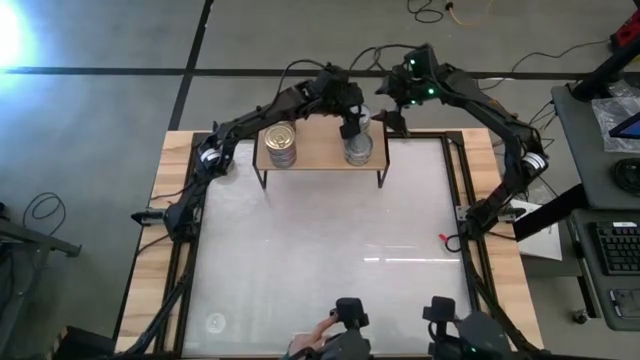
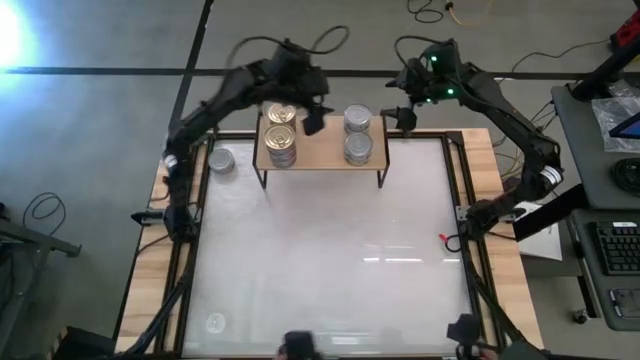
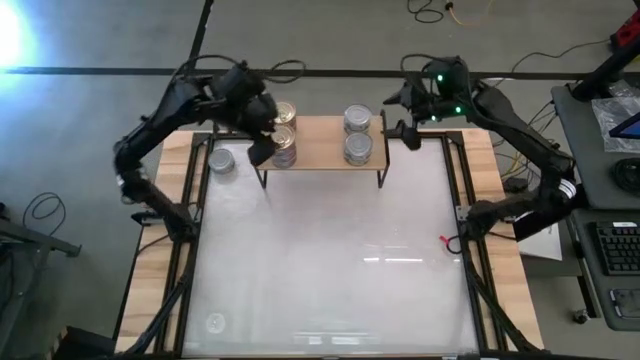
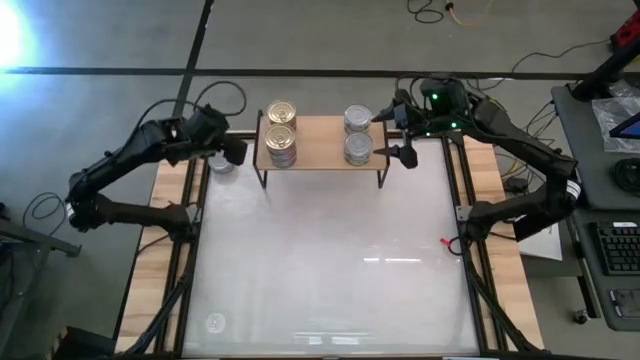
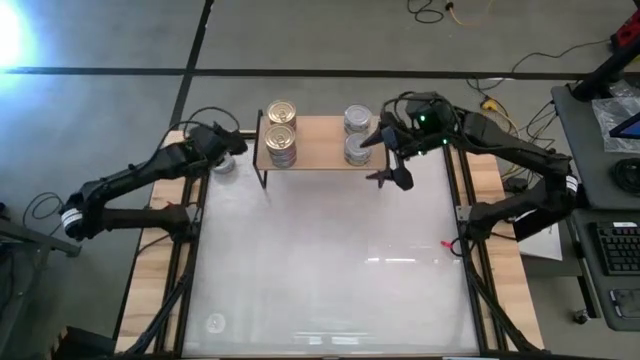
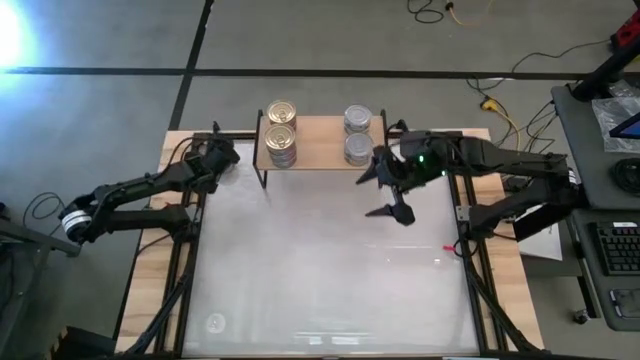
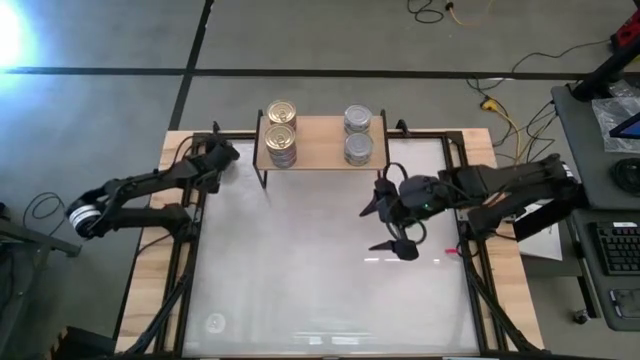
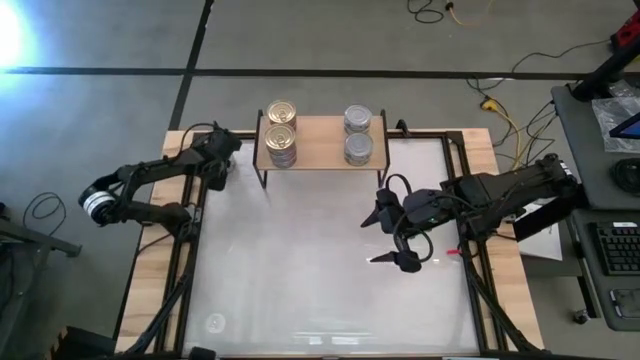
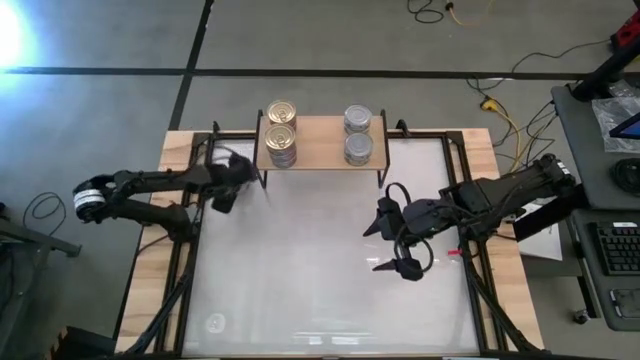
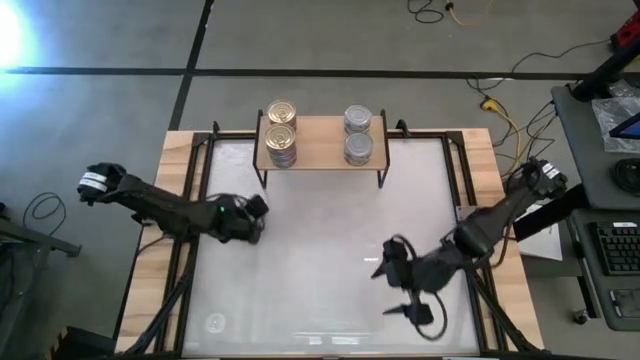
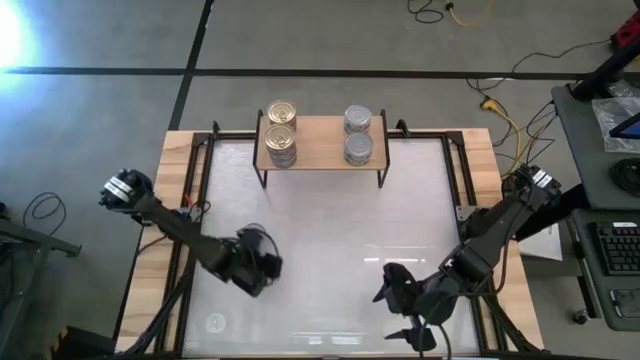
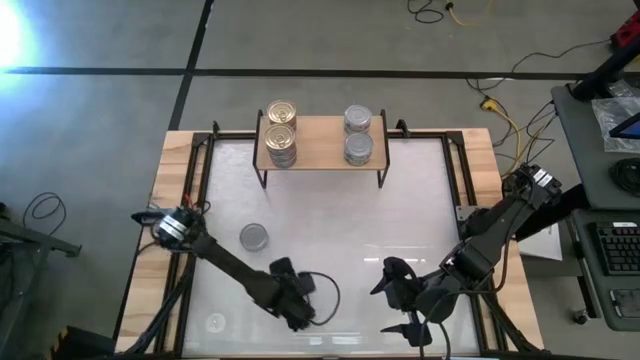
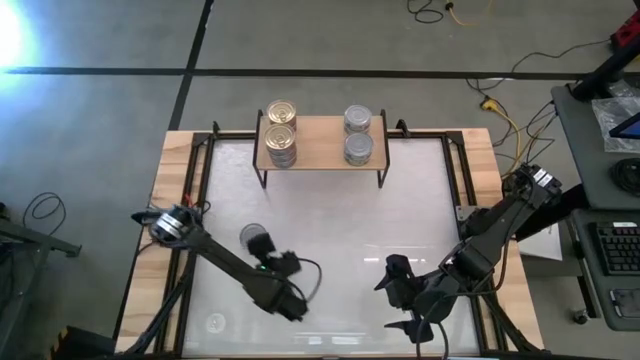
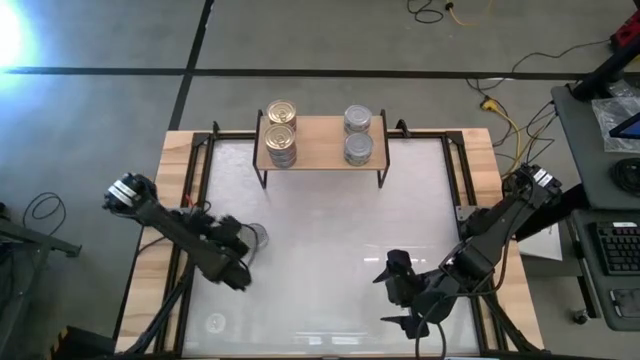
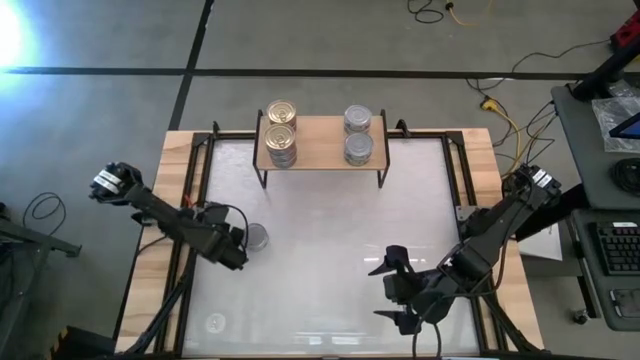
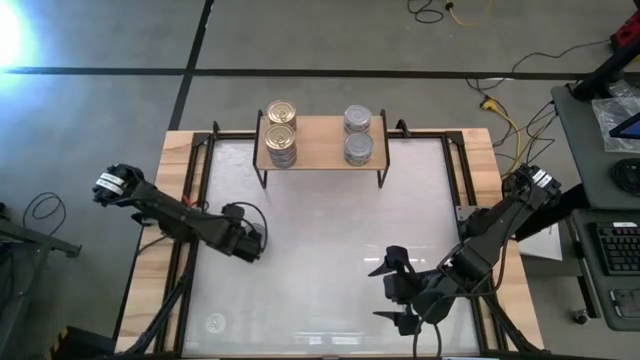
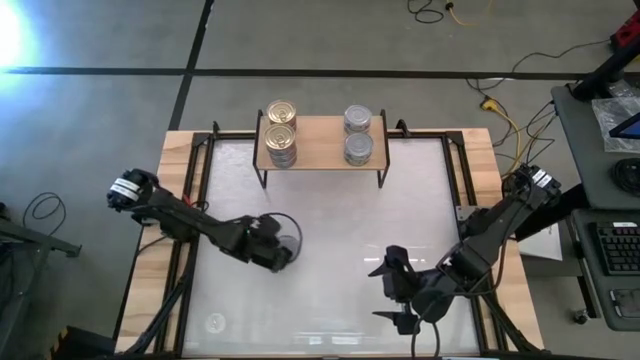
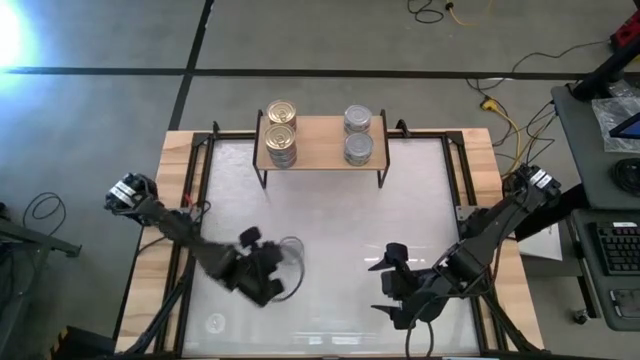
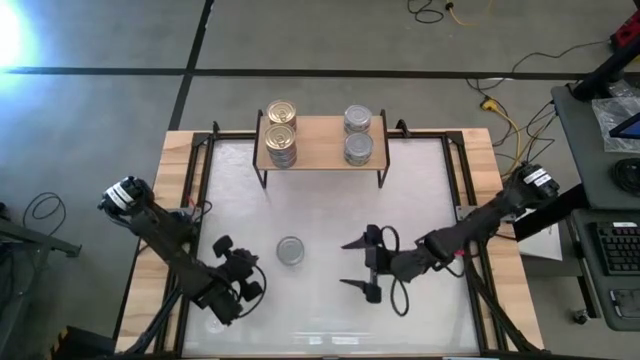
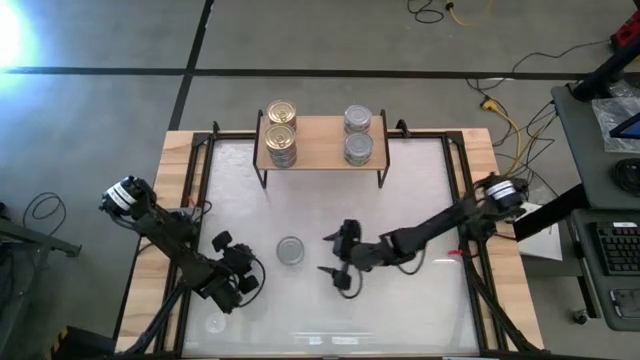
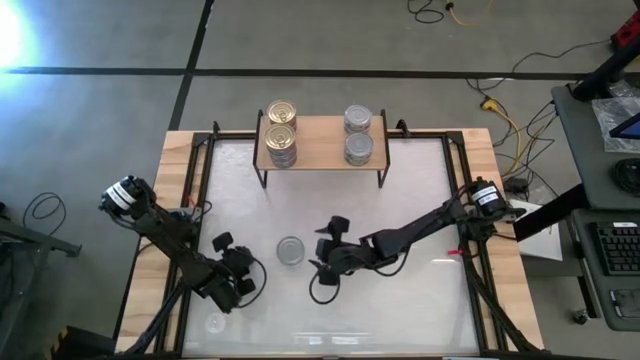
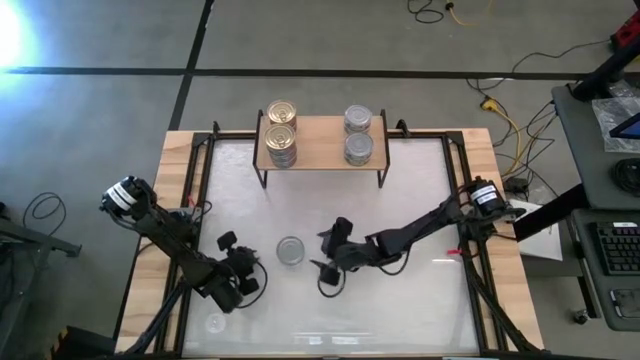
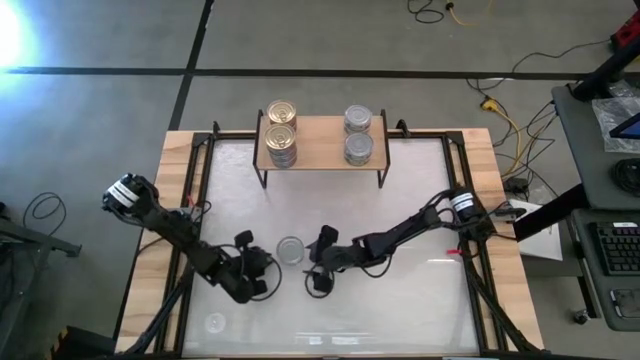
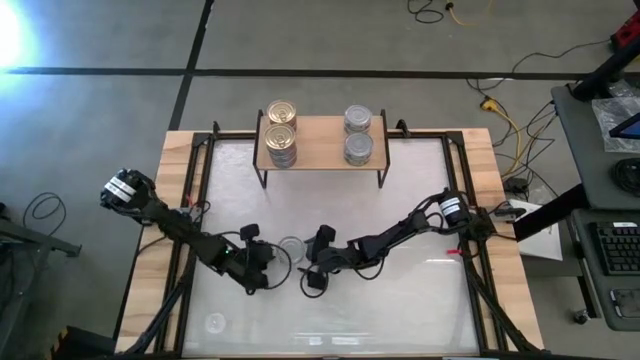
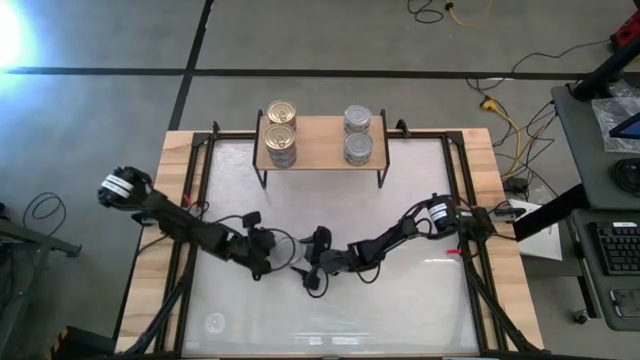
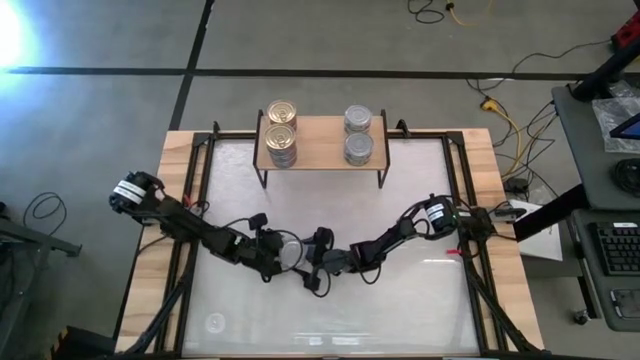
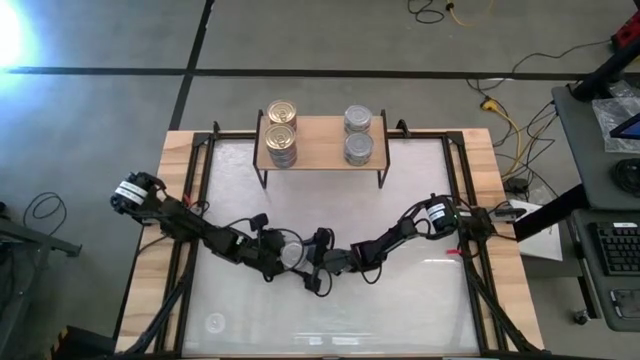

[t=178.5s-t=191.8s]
Task: Stack canned seafood by type on shelf
Stack the green tuna can on top of the other green tuna on the shelf

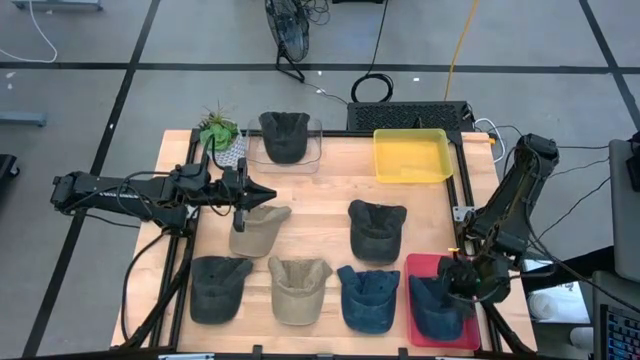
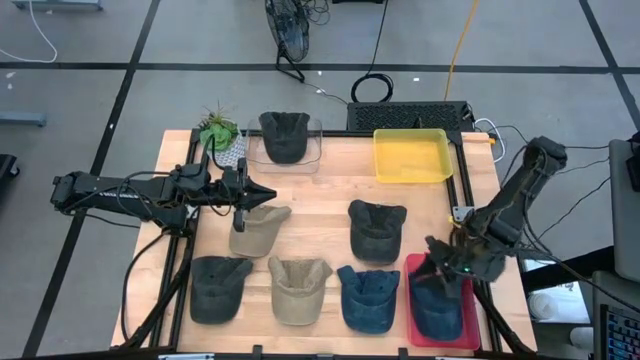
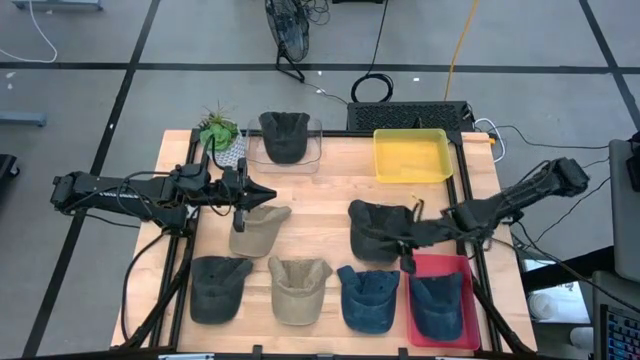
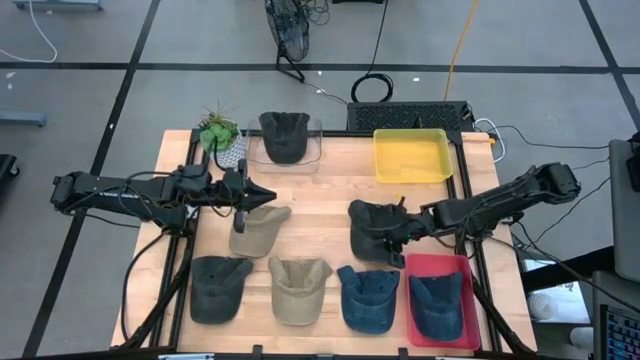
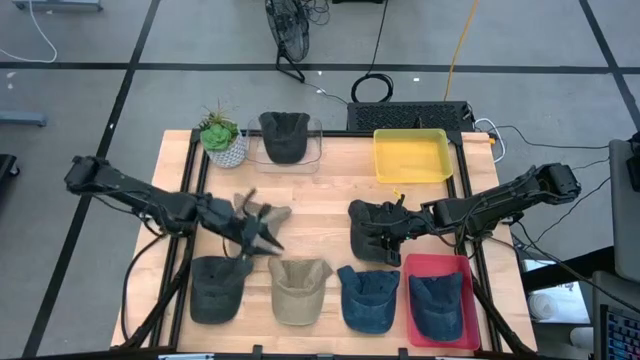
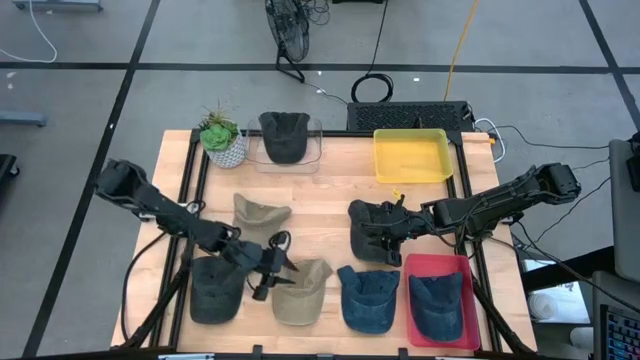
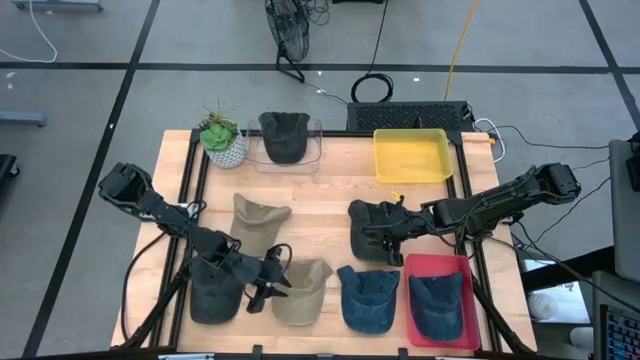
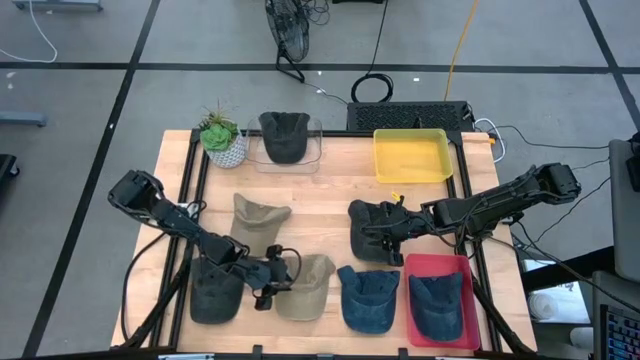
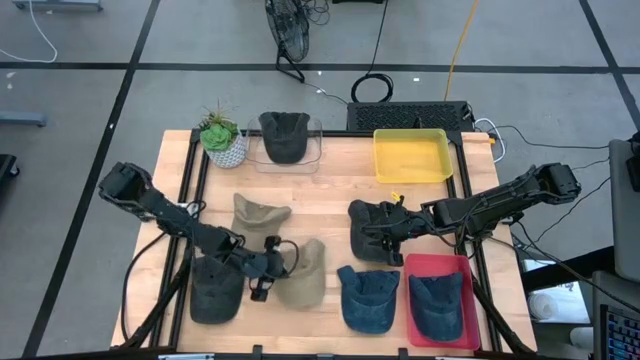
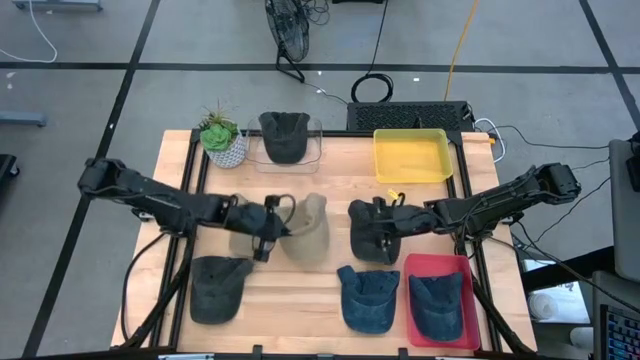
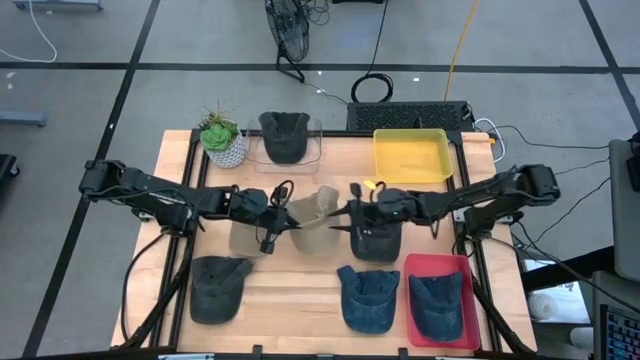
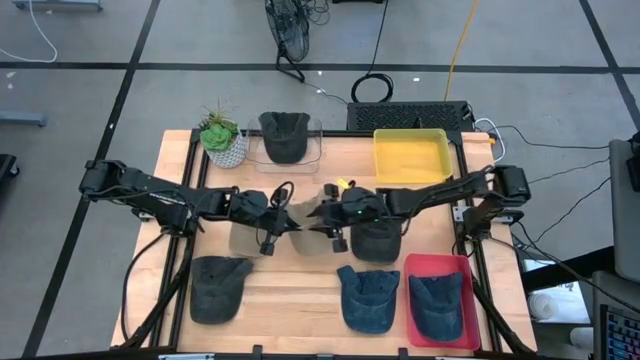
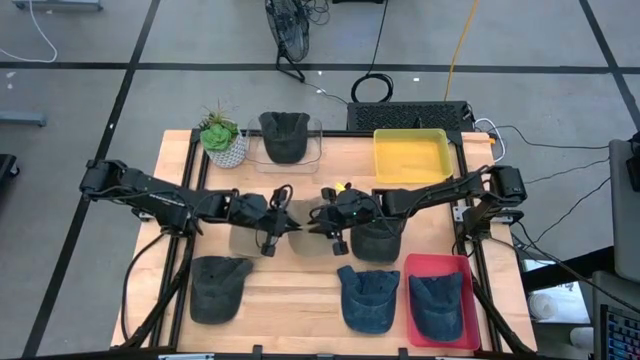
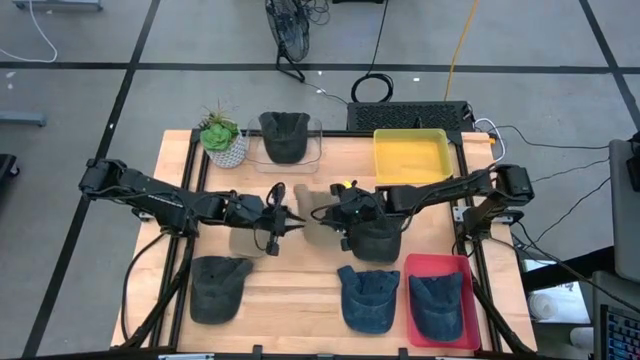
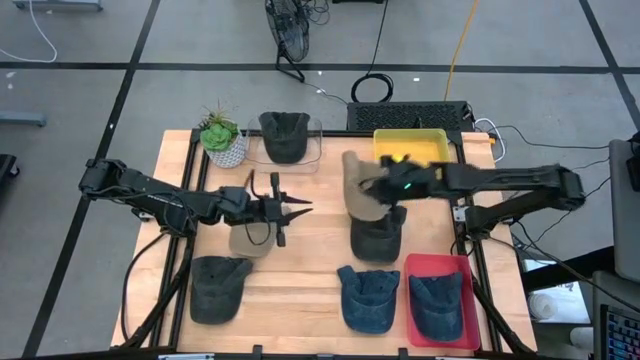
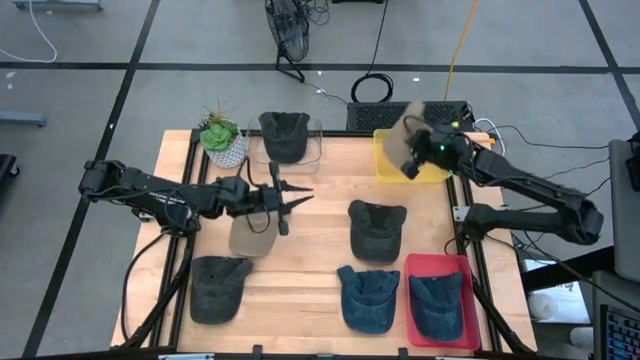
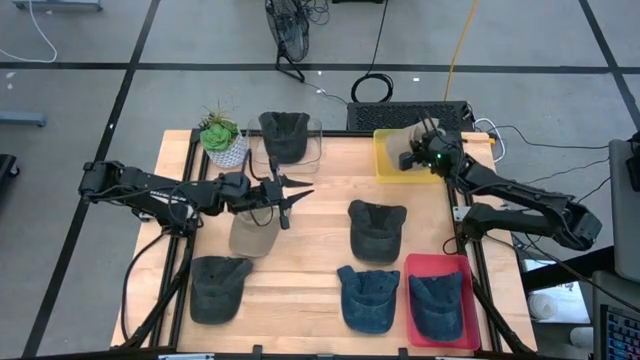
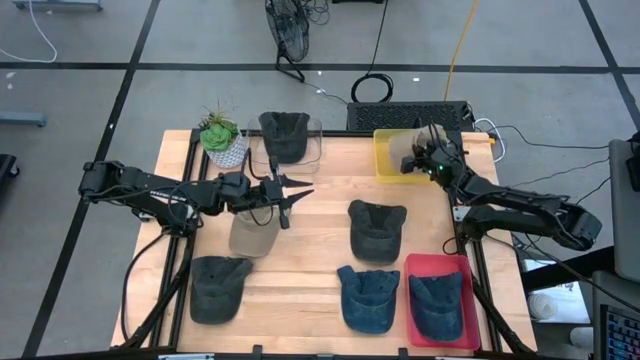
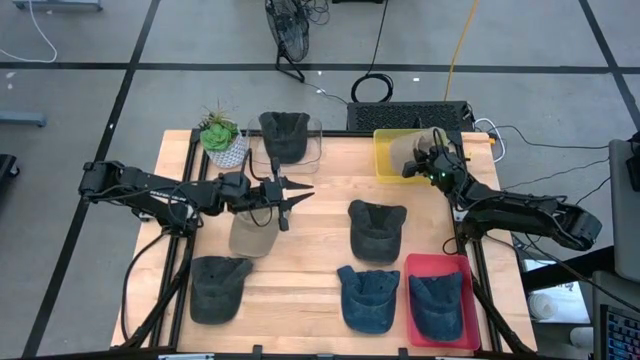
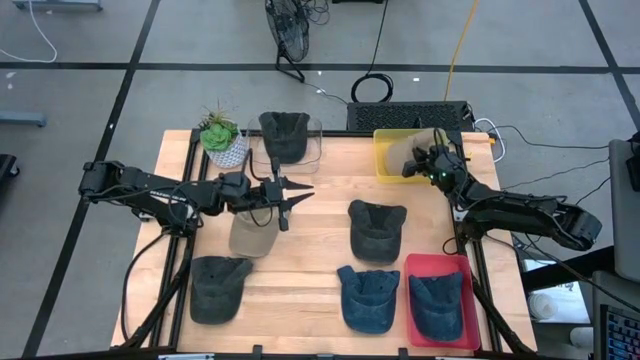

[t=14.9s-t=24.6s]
Task: Pick & Place hat
Put the bottom brown cap into the yellow bin
